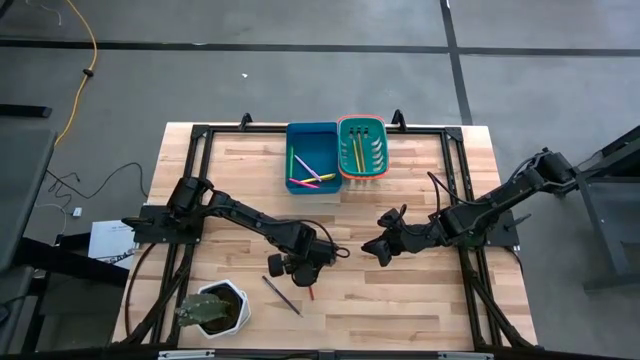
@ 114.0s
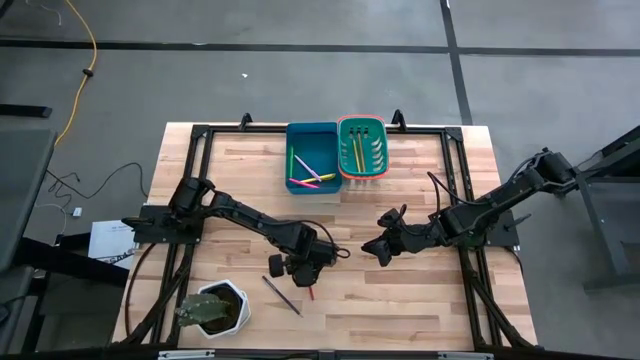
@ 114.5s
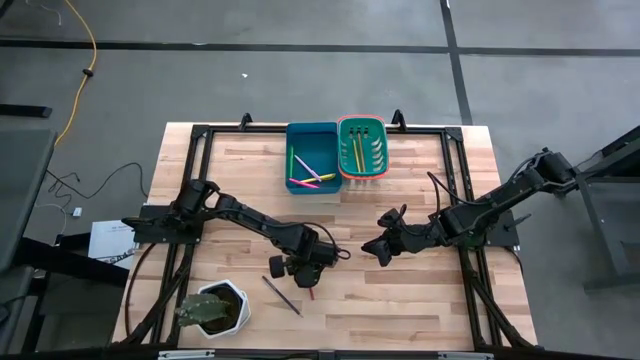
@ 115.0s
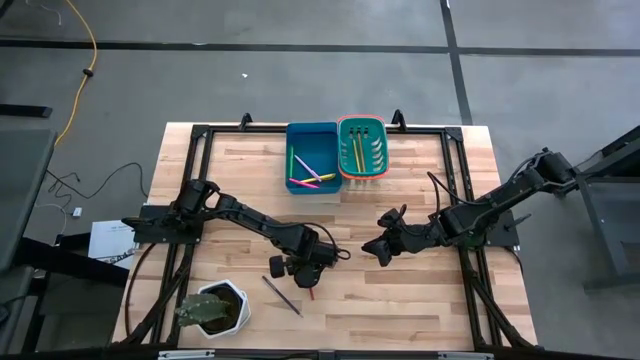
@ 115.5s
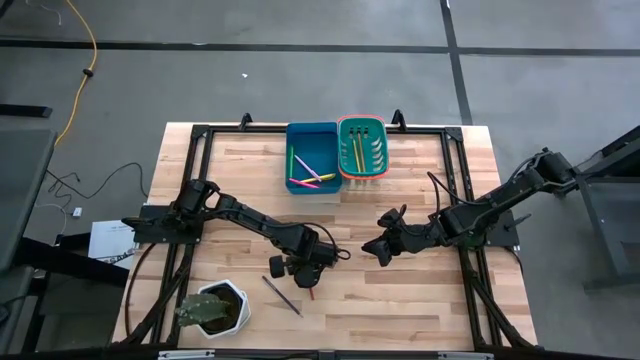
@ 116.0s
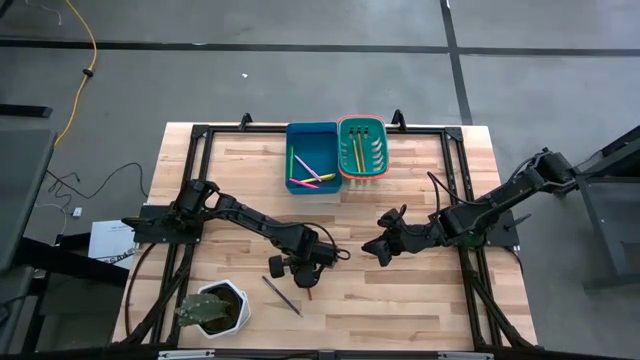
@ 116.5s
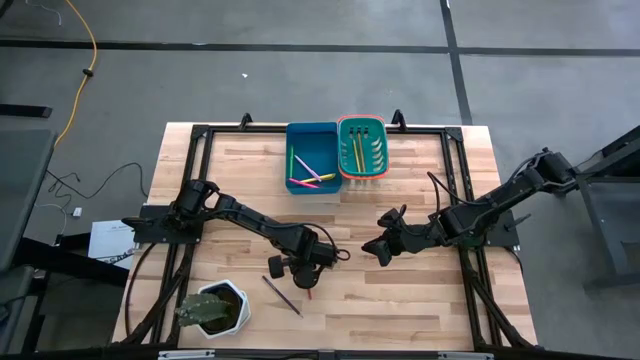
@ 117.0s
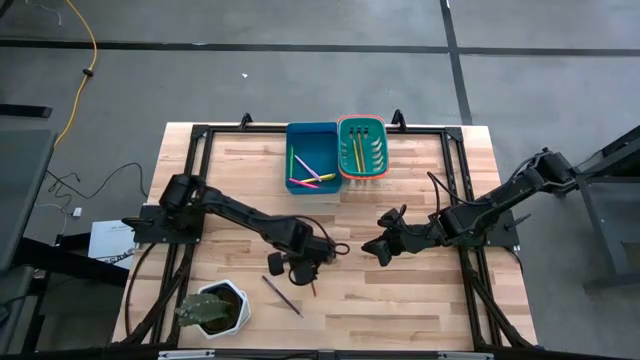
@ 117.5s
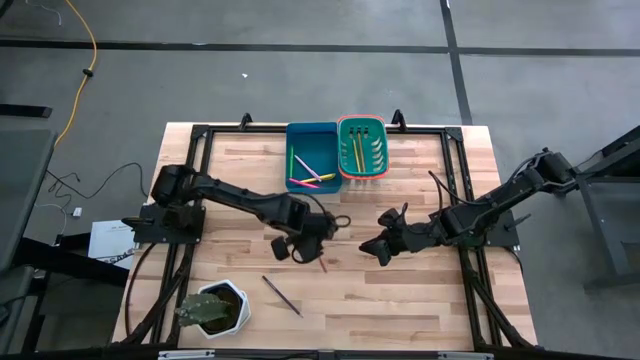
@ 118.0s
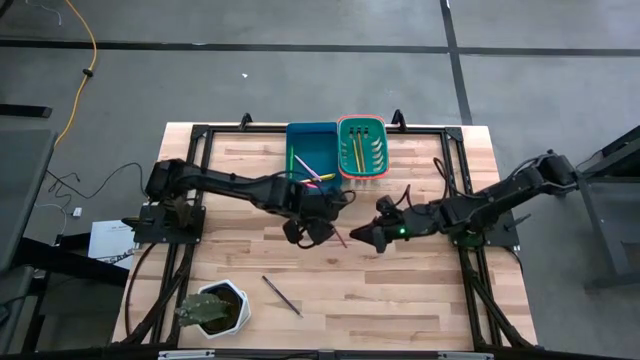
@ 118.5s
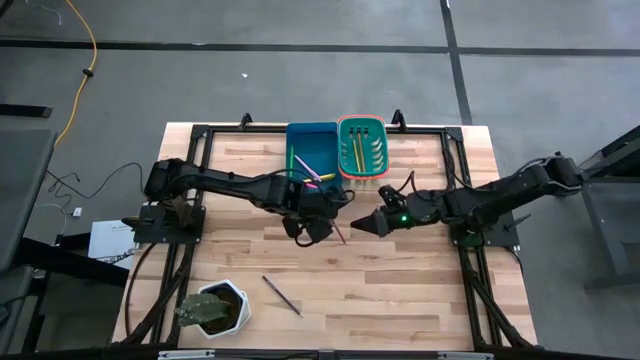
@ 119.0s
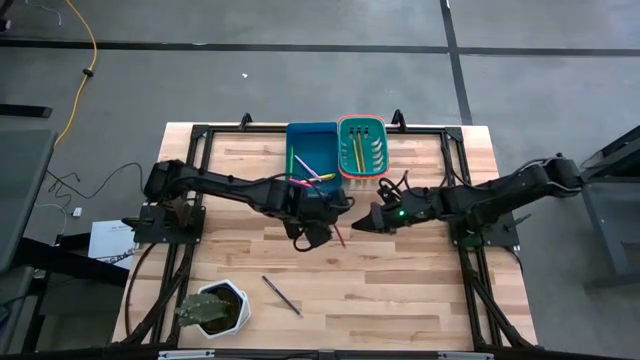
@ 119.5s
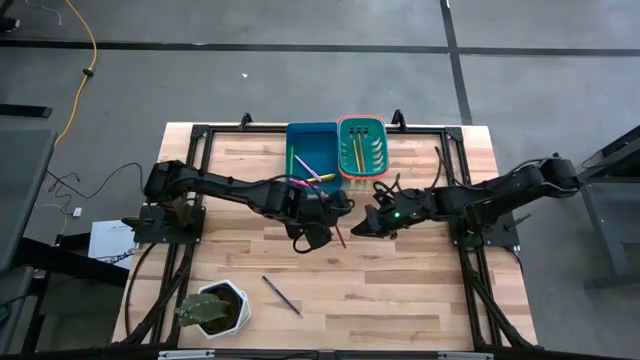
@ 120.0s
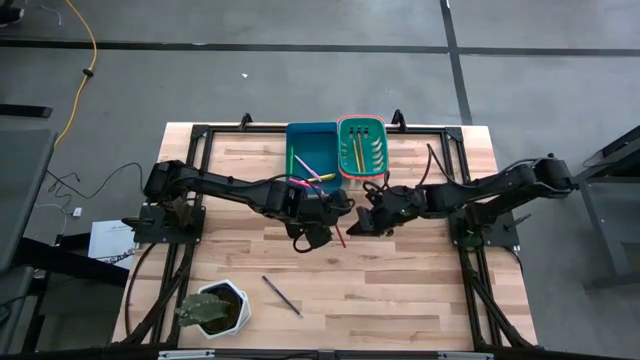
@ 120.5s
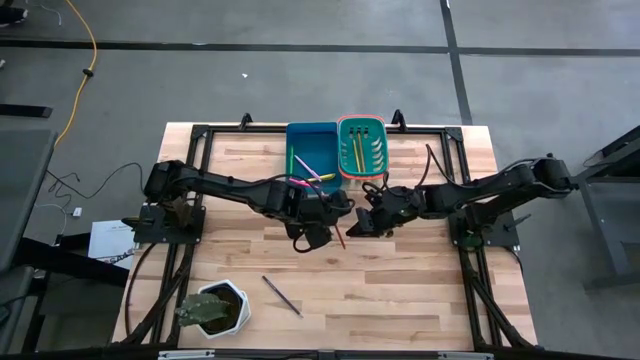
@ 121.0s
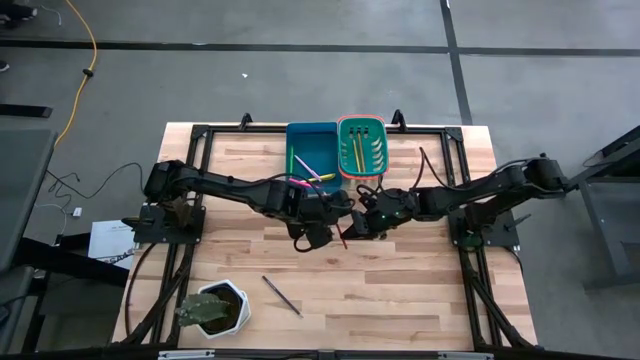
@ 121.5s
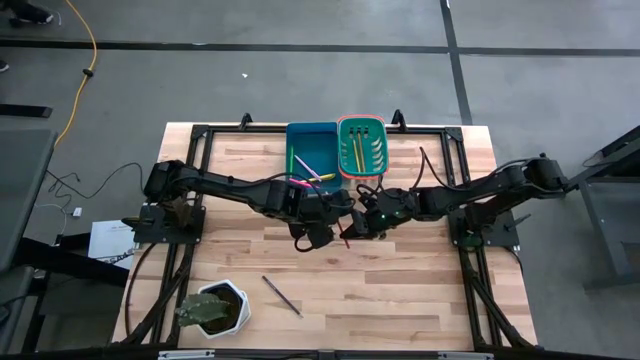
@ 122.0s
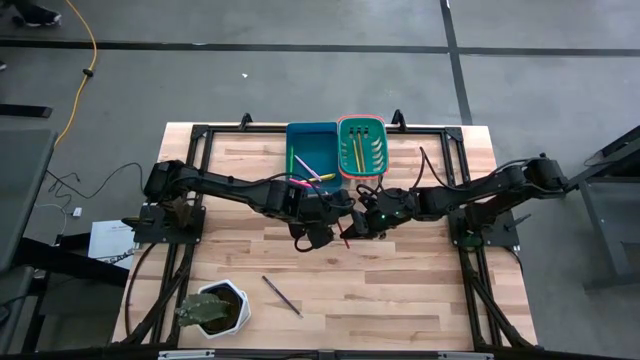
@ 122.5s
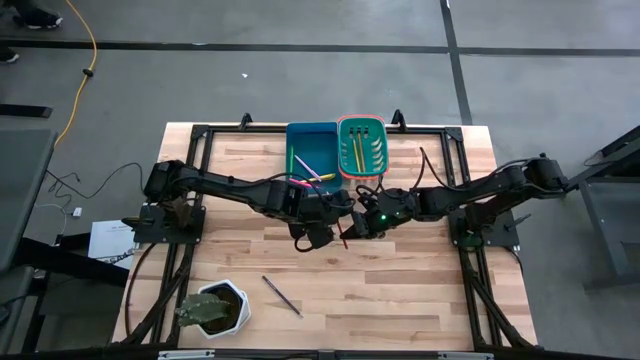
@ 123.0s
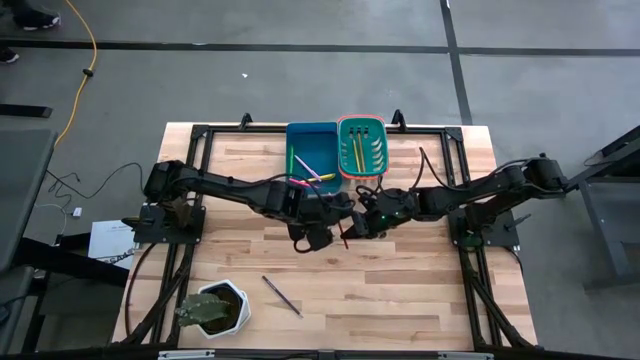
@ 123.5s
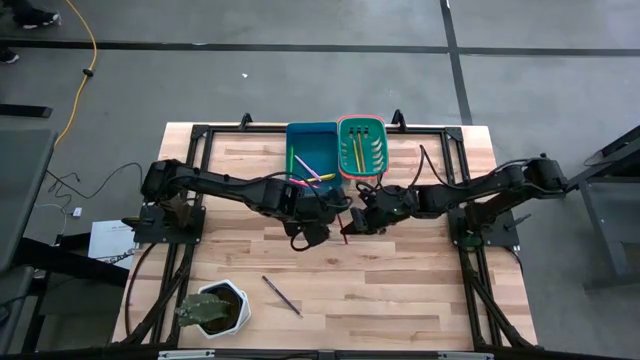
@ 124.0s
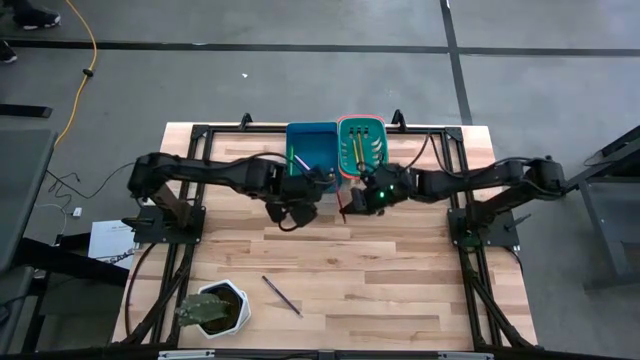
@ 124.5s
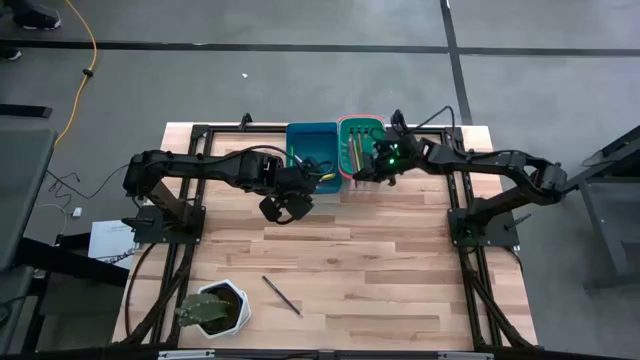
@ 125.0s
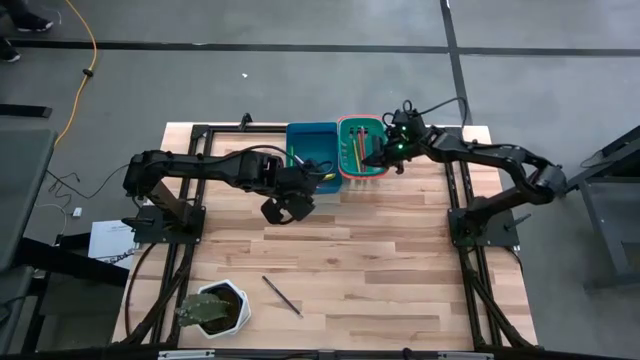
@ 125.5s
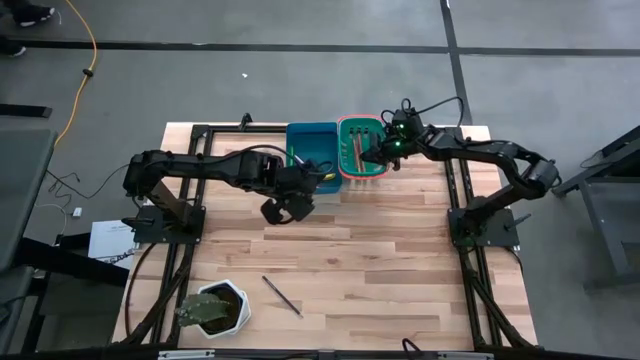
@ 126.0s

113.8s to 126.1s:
Task: Sort pens & pencils
Put the red pencil into the green bin

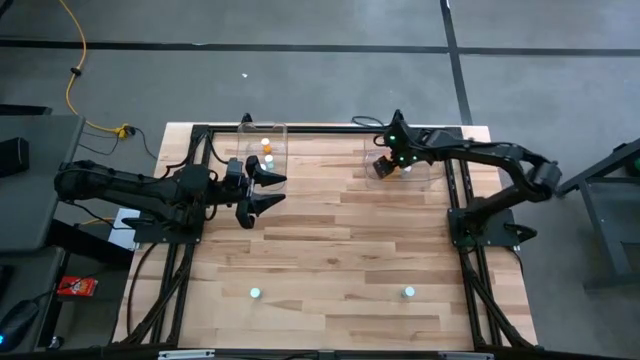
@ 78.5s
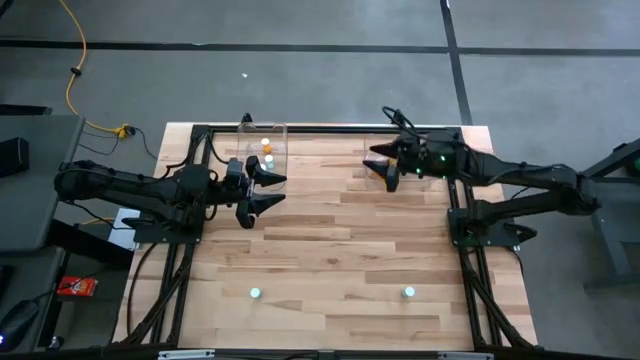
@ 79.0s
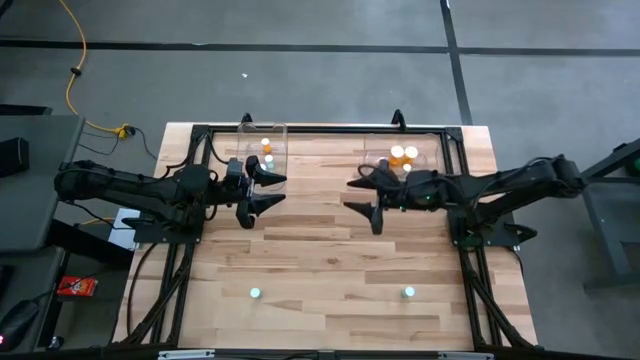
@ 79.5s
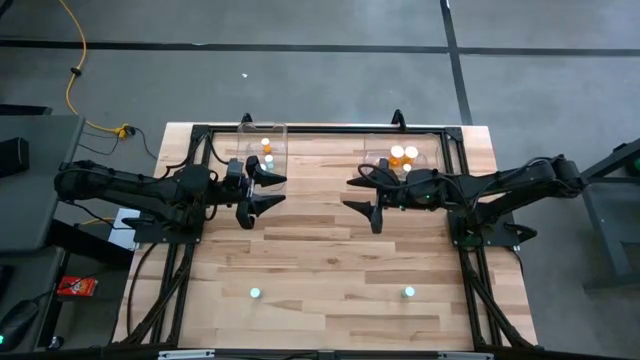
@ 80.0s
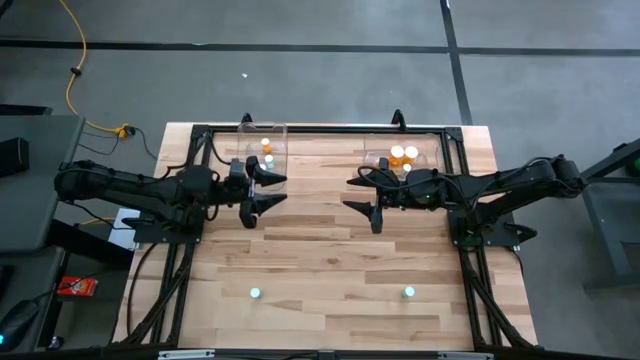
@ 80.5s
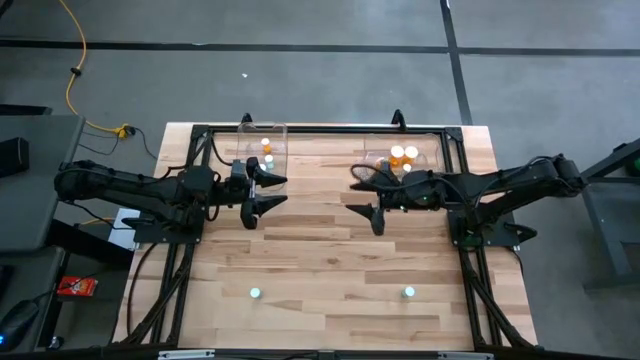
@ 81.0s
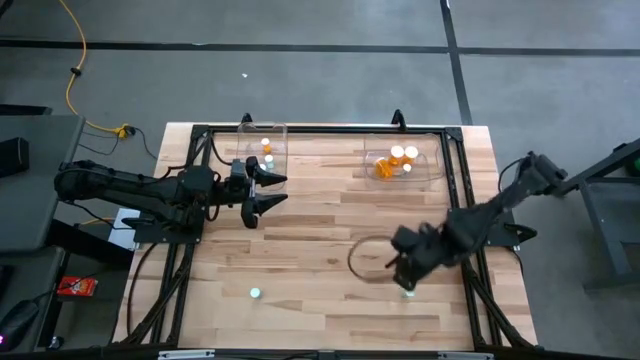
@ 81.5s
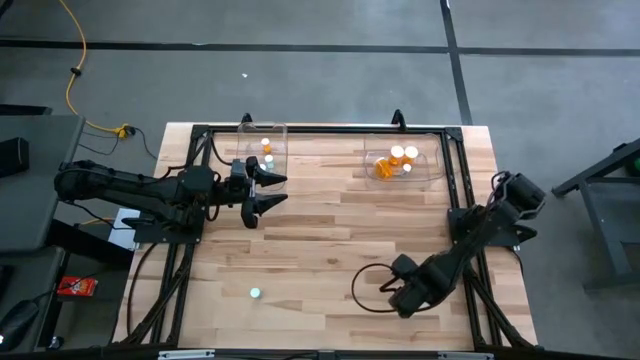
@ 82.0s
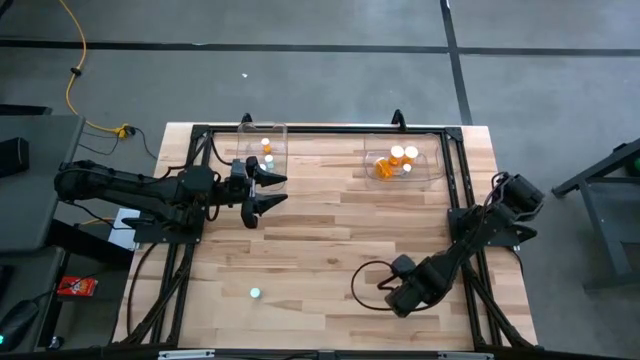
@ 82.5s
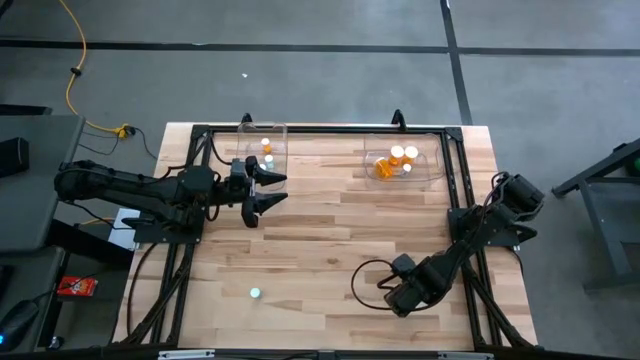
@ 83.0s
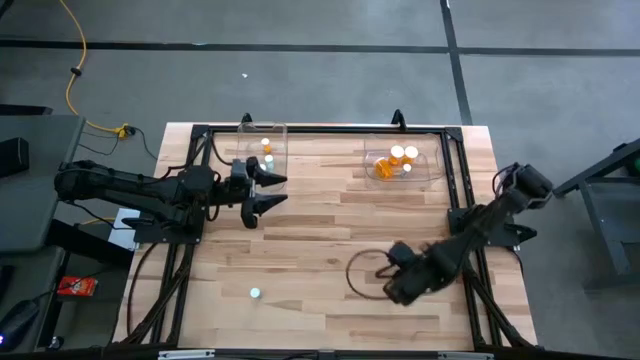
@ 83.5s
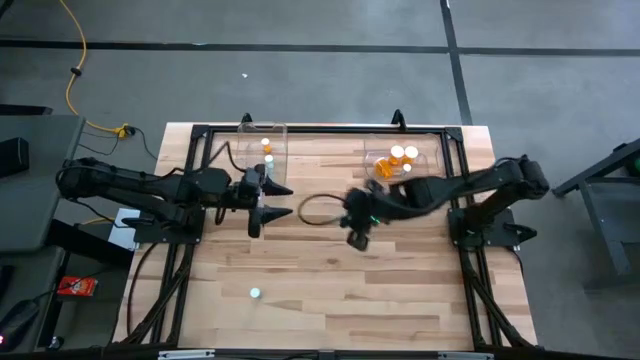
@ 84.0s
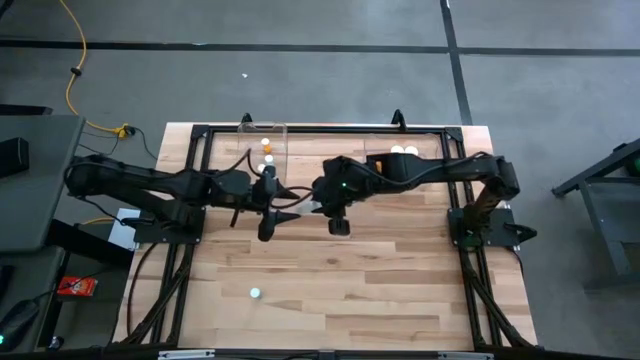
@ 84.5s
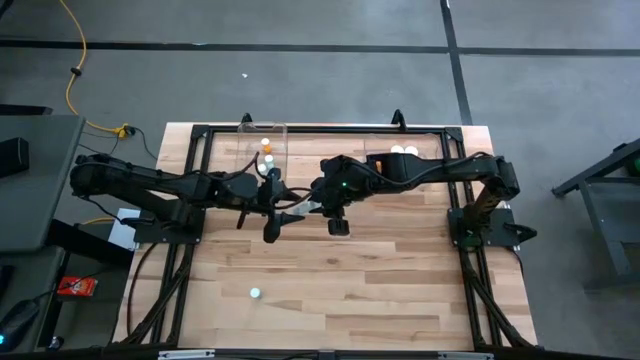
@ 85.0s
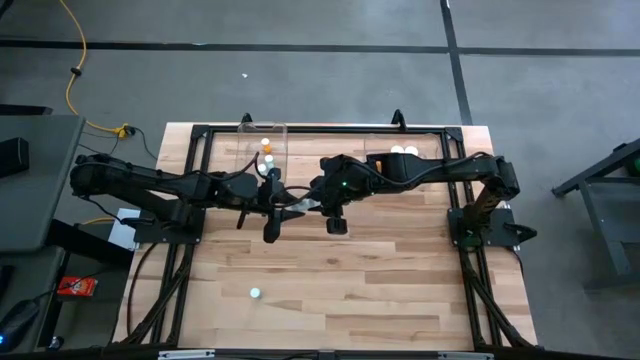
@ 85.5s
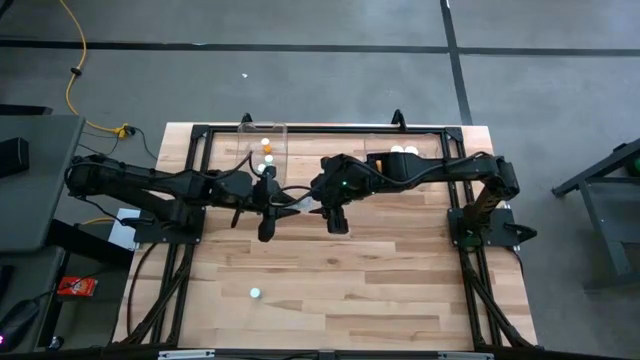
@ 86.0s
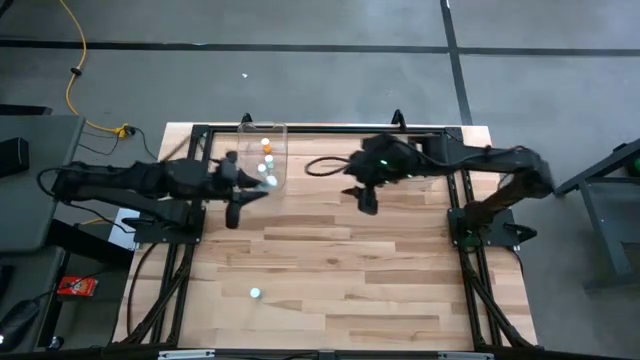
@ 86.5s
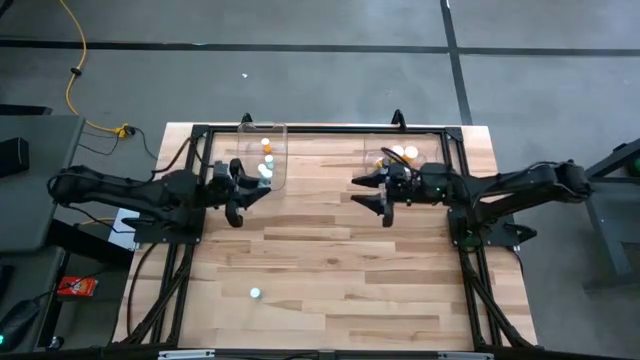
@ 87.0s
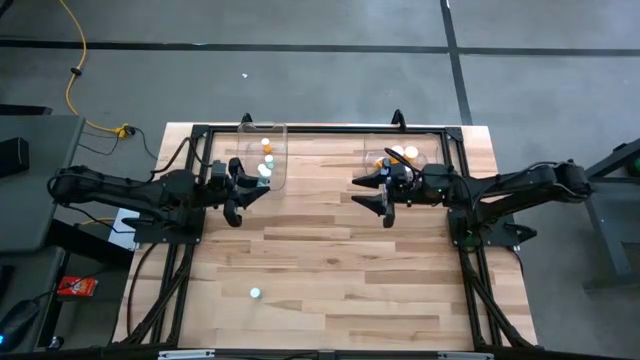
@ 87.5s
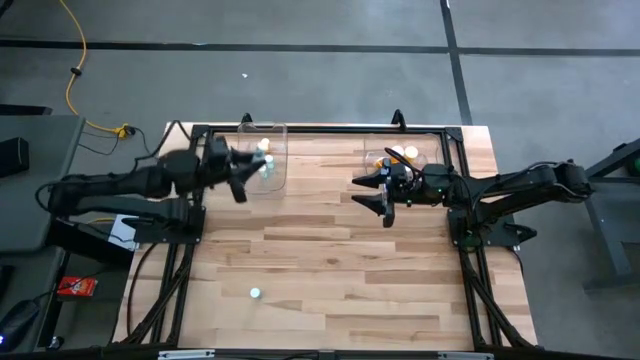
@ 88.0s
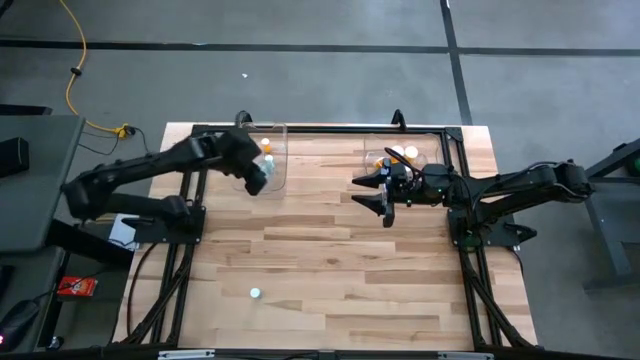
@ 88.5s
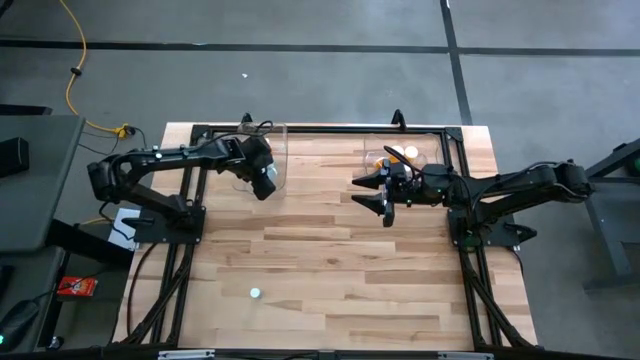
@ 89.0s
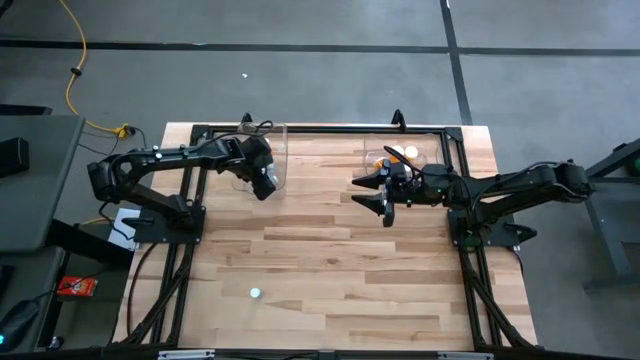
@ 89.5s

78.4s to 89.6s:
Task: Pick and place medicine bottles into bin by pill shape (circle, oval)
Put the blue pill bottle into the left transparent bin
